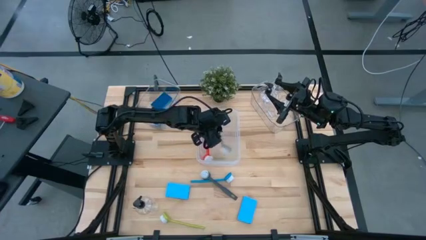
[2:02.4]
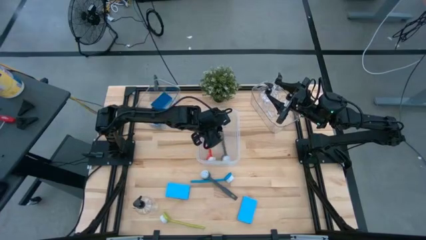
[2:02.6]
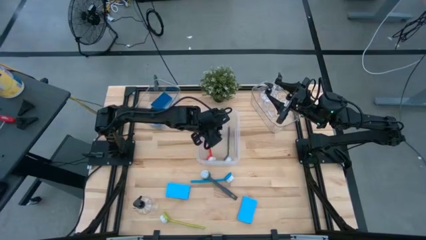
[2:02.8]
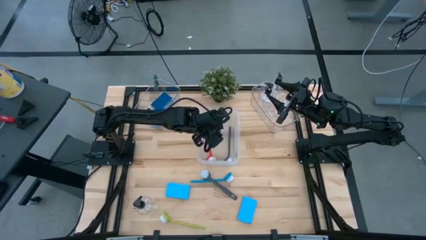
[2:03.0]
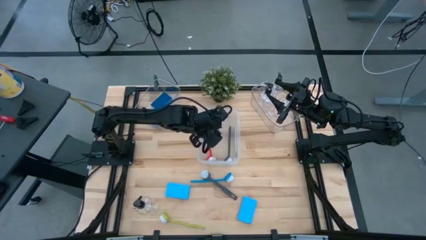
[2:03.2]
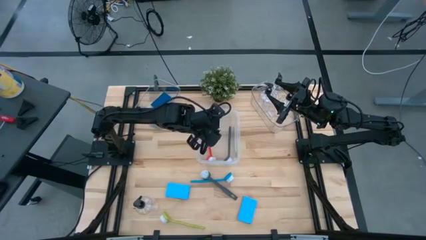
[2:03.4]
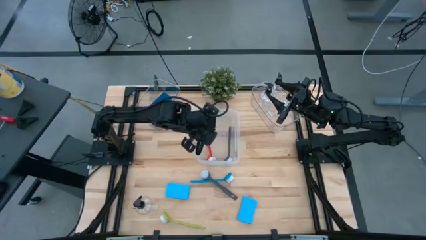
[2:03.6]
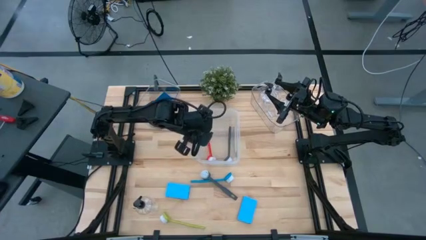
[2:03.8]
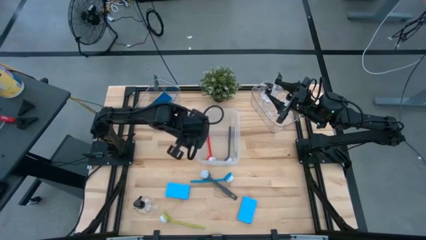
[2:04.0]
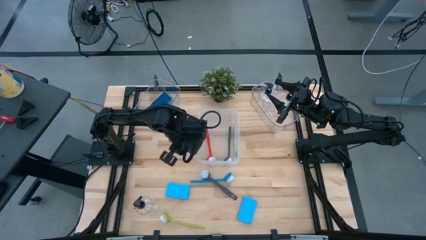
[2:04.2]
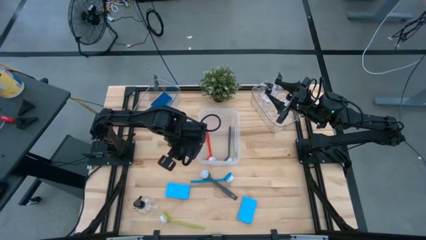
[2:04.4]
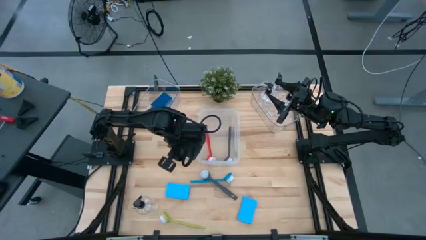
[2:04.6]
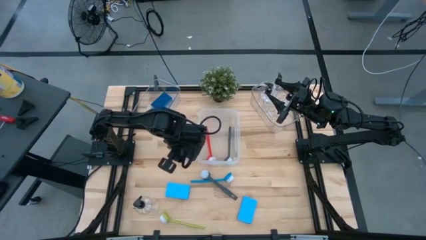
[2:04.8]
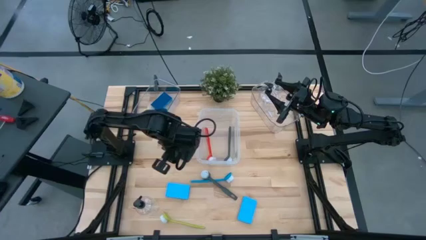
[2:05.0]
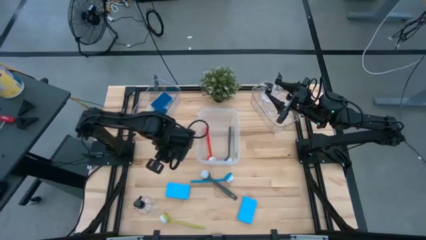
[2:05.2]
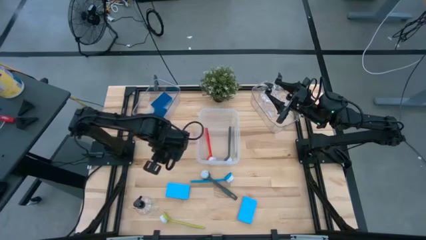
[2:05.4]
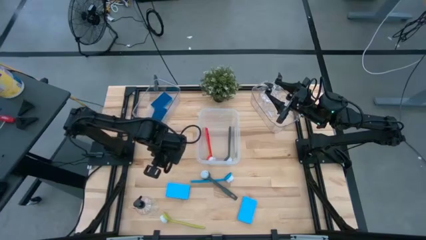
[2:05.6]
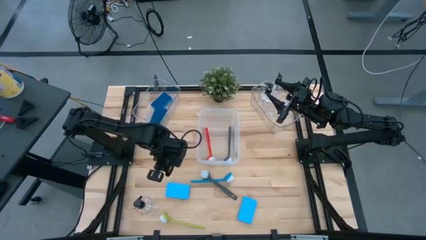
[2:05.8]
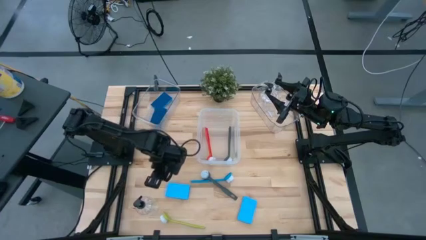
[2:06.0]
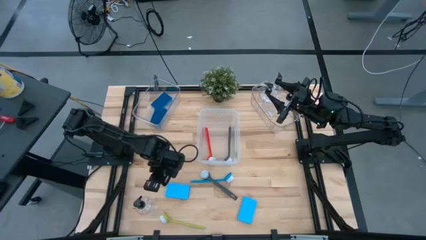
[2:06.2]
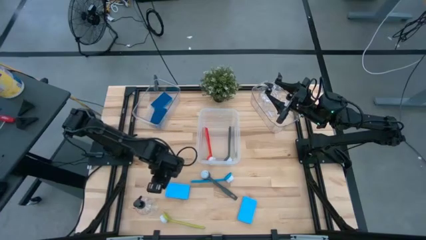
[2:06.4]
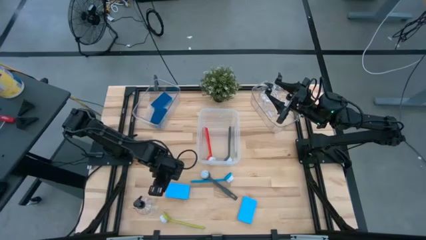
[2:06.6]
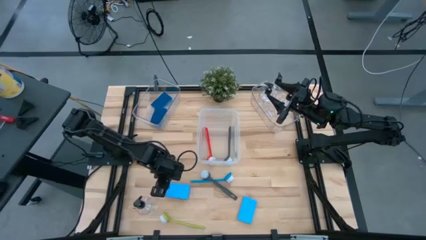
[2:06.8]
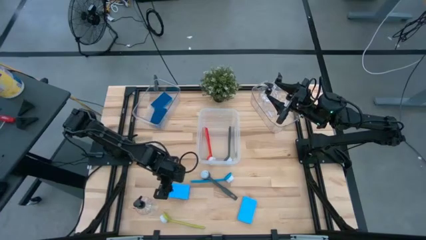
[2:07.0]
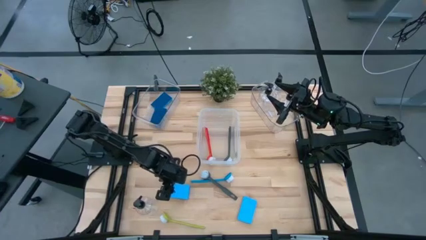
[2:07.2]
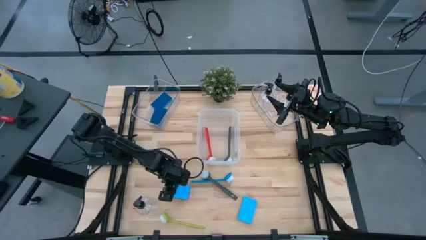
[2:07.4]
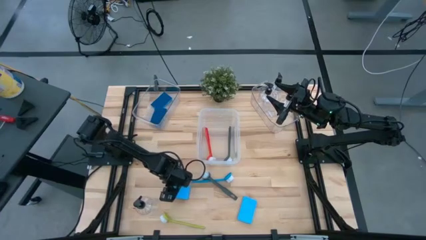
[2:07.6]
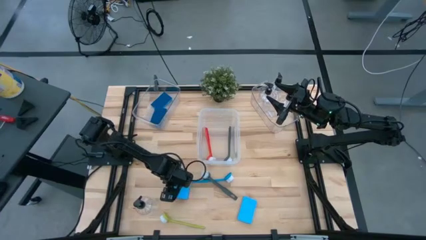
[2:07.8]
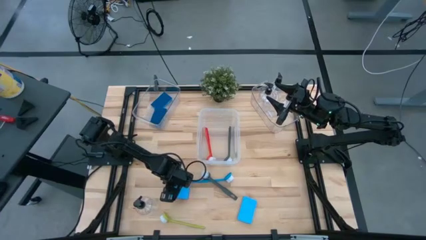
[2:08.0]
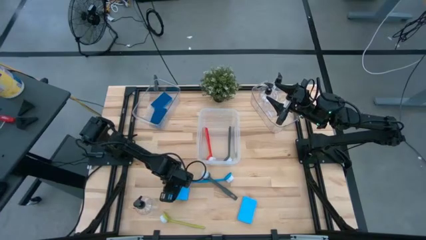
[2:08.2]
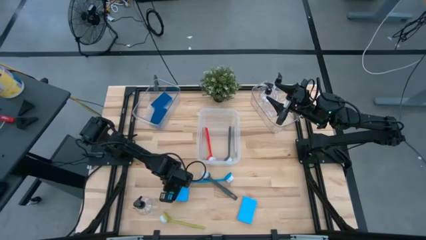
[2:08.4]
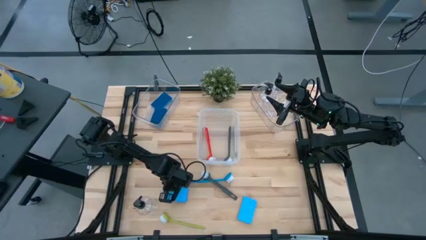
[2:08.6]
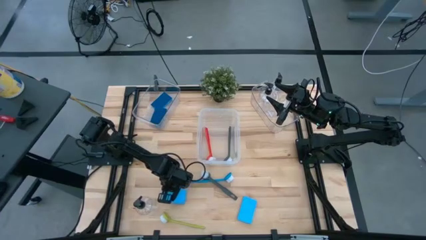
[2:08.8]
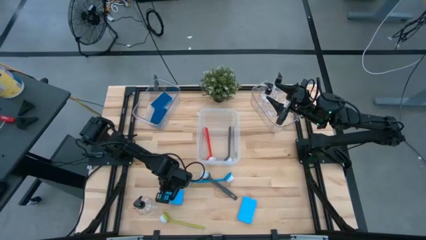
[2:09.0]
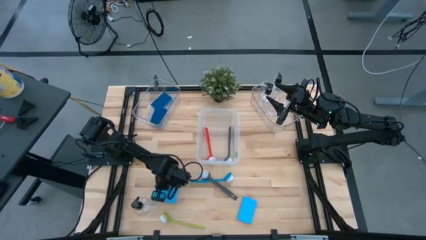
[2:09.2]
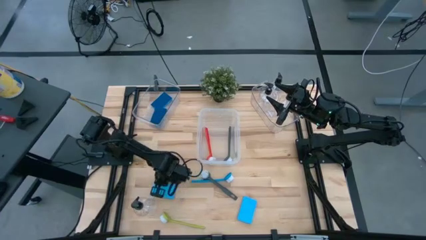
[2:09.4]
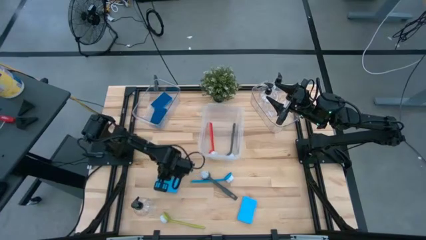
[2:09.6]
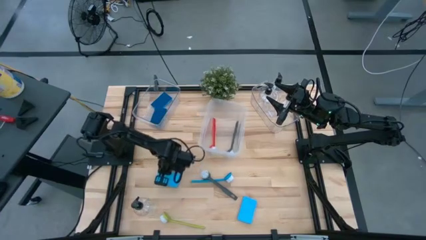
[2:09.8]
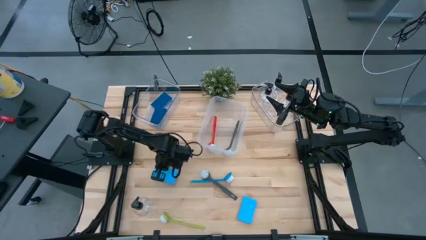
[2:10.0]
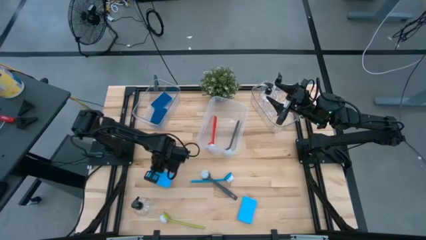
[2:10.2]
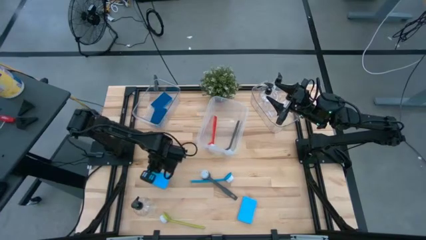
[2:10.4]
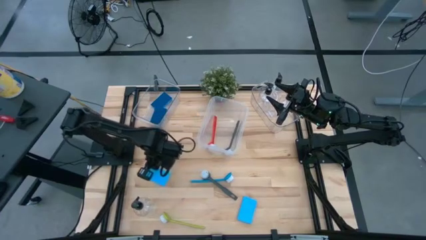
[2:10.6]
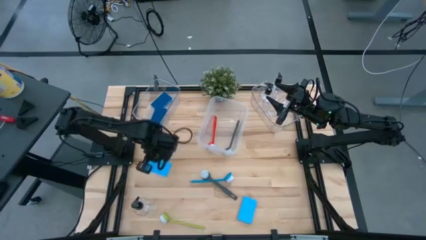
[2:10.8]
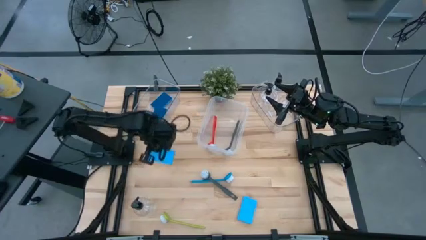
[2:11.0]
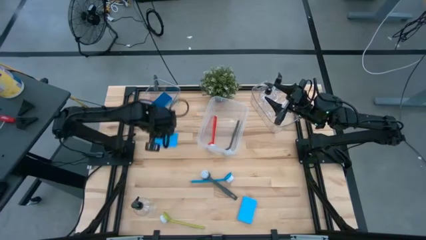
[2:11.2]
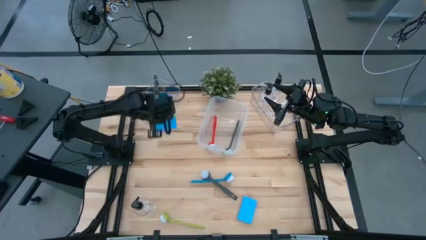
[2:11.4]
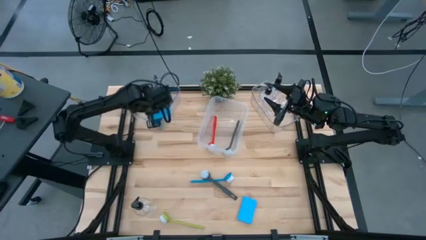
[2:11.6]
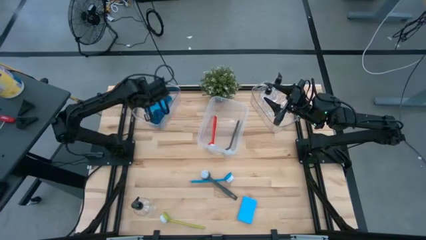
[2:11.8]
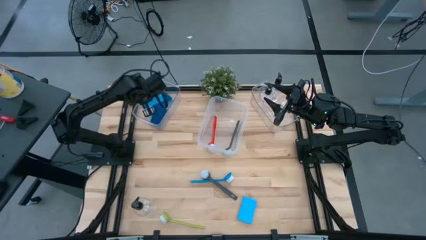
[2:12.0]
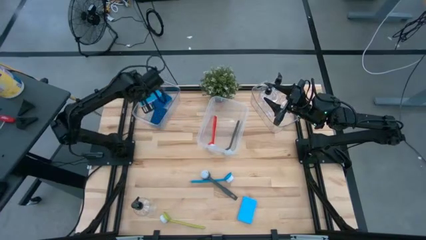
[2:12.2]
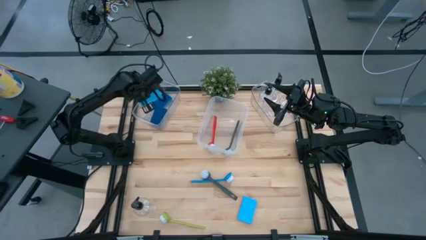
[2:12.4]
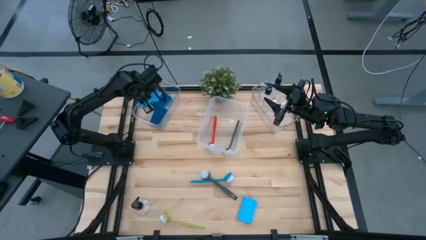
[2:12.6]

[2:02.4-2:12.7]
Task: Pick & Place Kitchen Sink Supplies
Put the blue sponge in the left transparent bin
